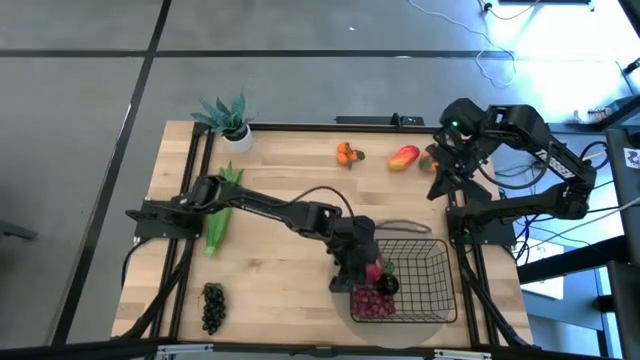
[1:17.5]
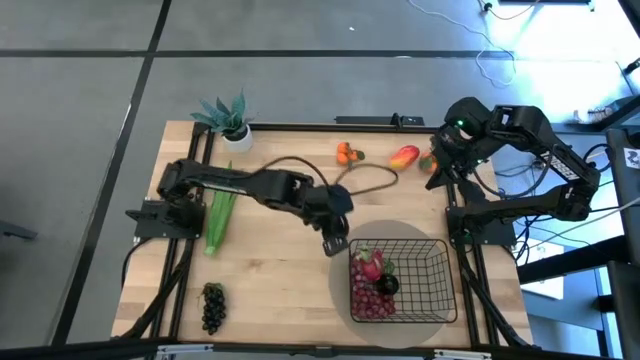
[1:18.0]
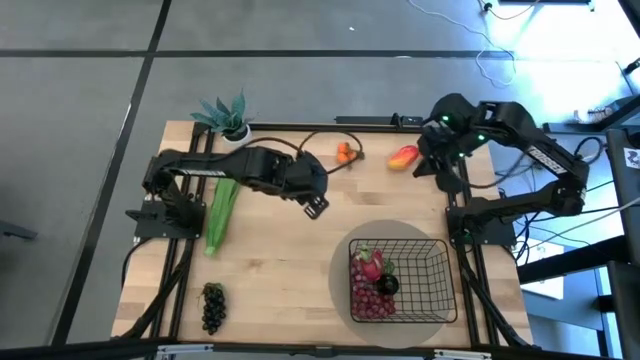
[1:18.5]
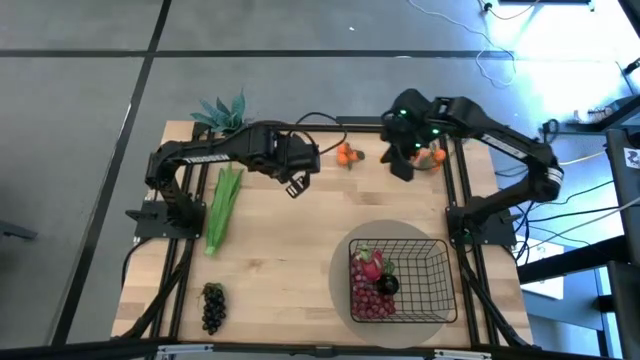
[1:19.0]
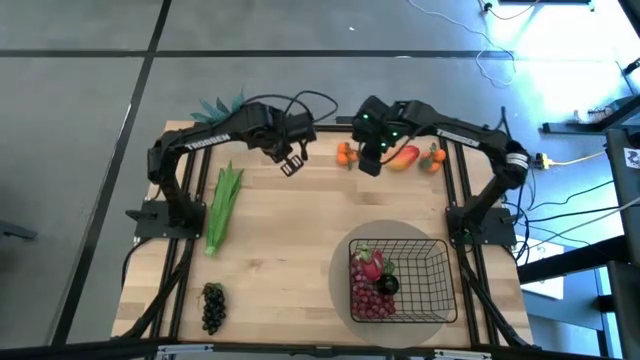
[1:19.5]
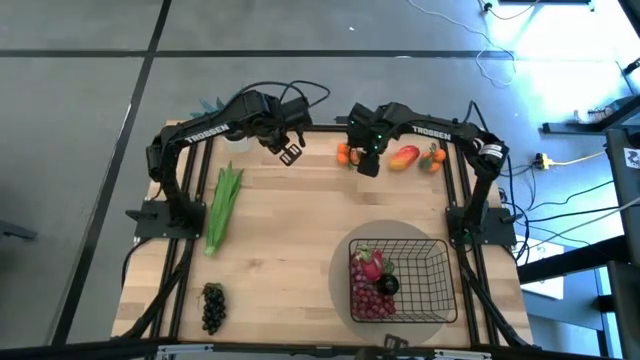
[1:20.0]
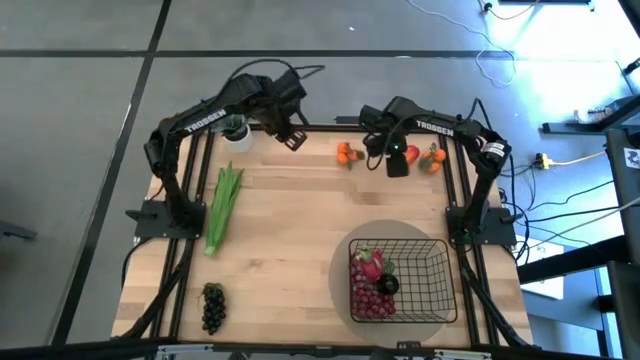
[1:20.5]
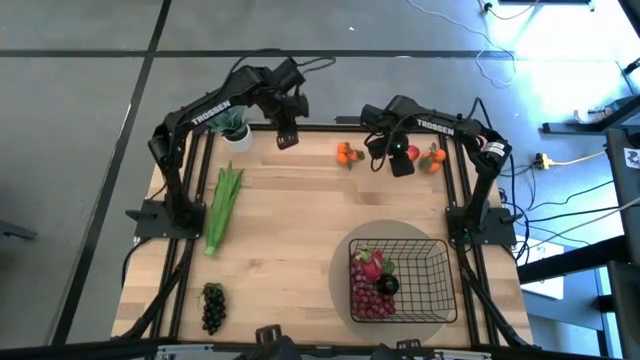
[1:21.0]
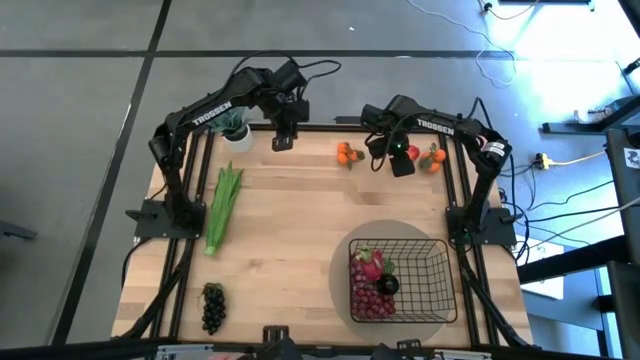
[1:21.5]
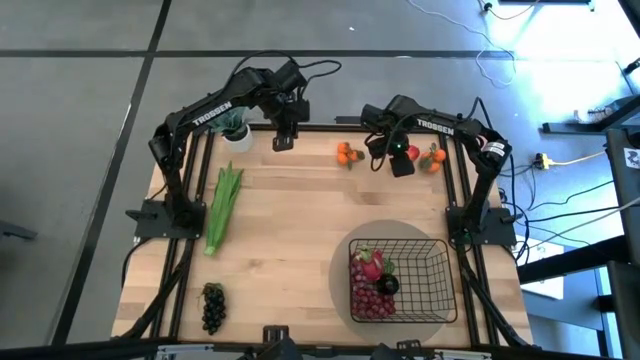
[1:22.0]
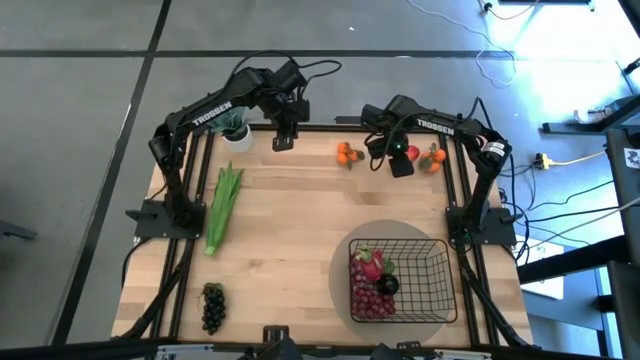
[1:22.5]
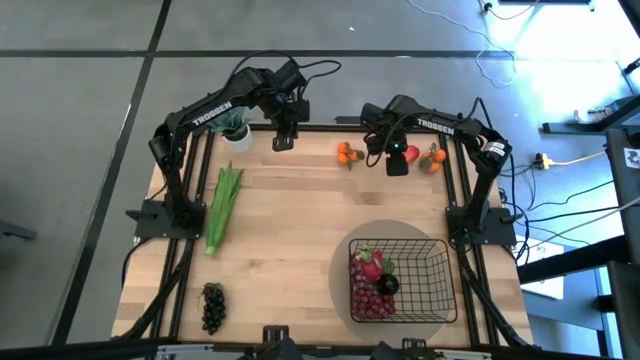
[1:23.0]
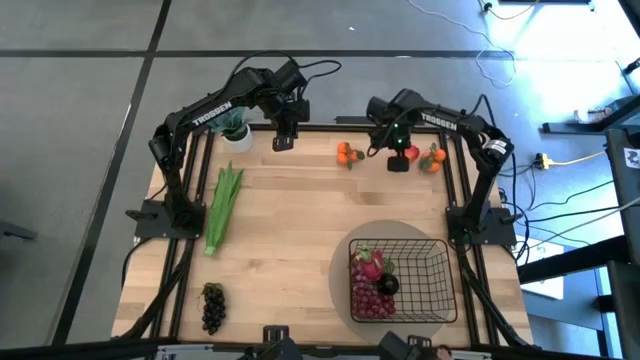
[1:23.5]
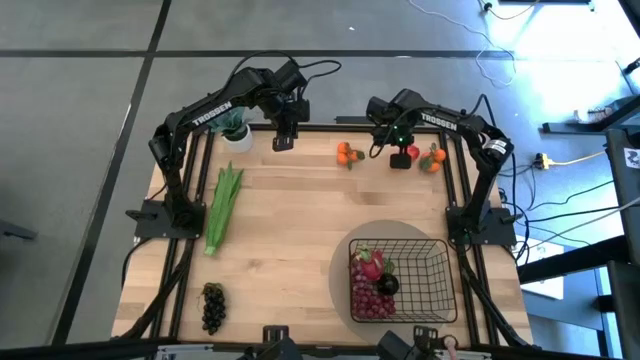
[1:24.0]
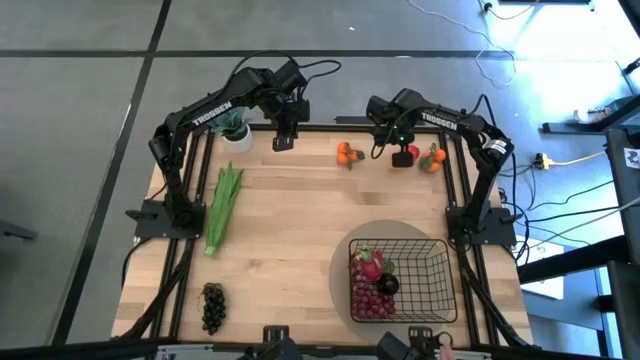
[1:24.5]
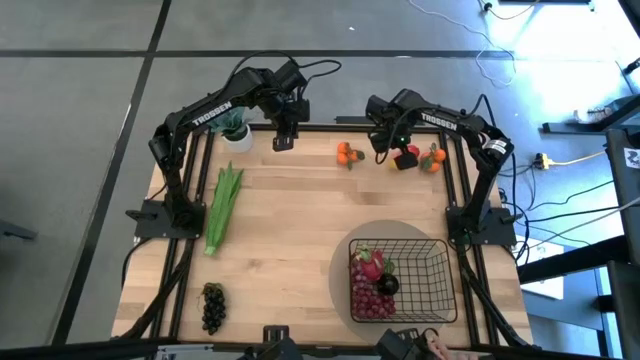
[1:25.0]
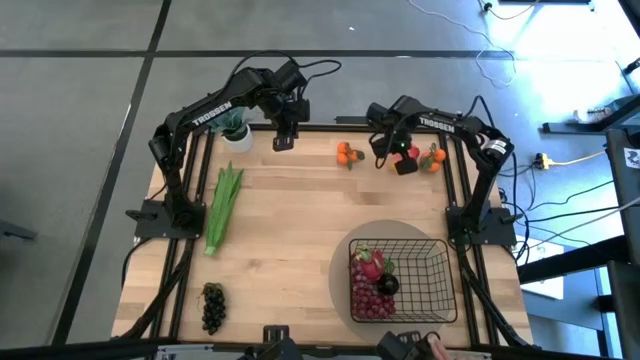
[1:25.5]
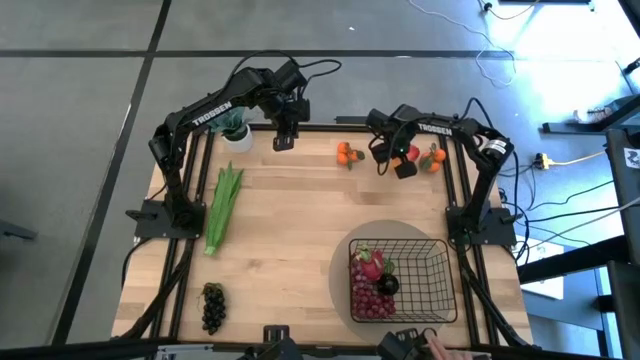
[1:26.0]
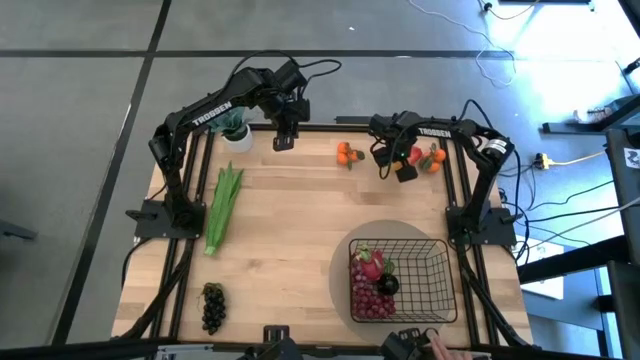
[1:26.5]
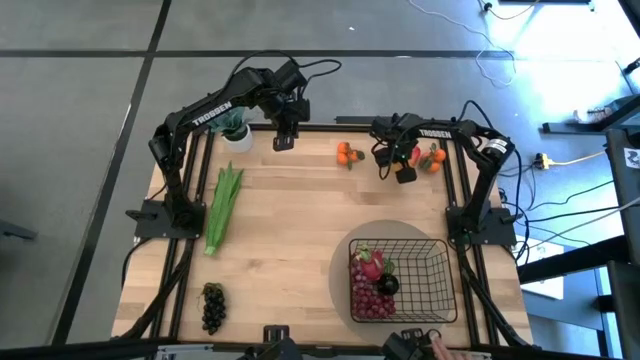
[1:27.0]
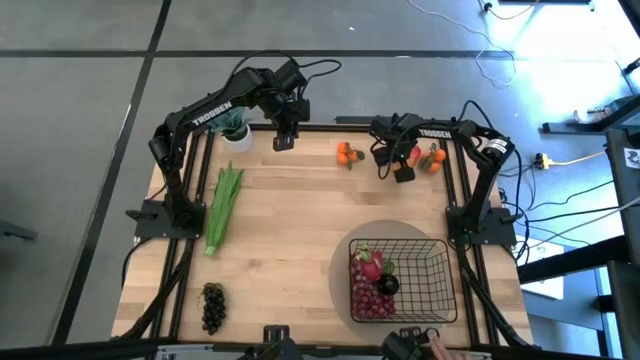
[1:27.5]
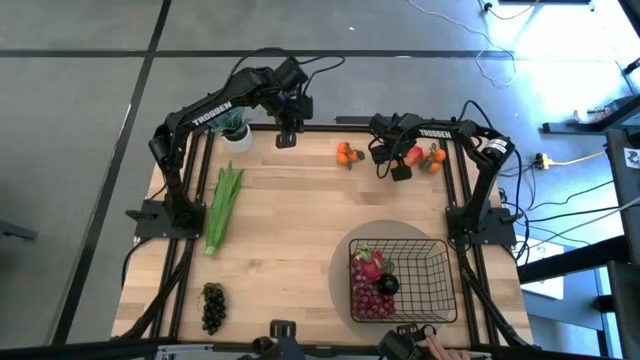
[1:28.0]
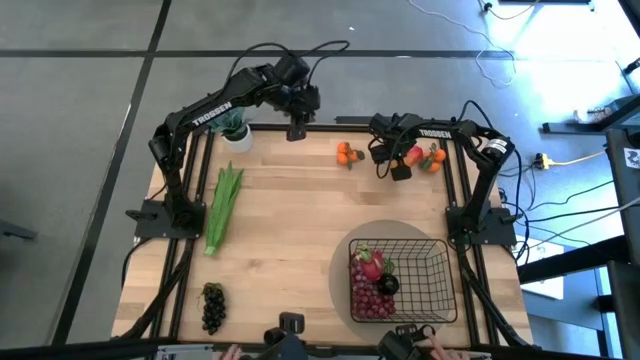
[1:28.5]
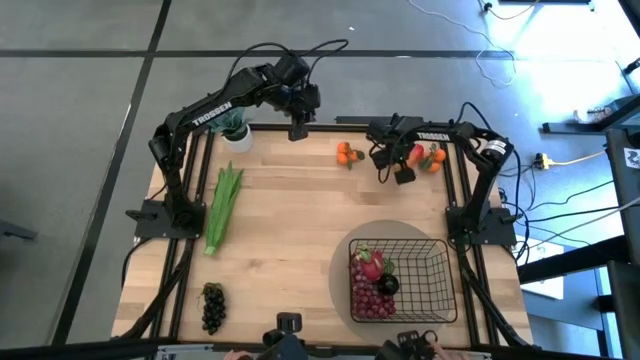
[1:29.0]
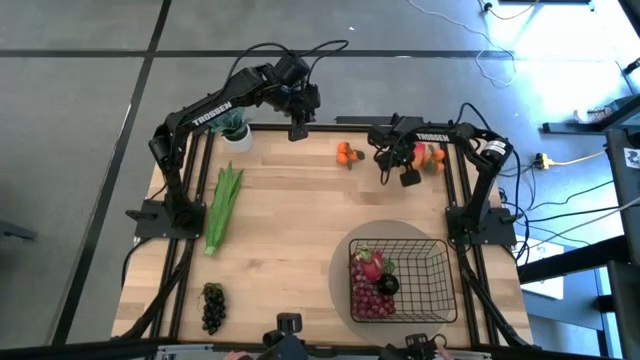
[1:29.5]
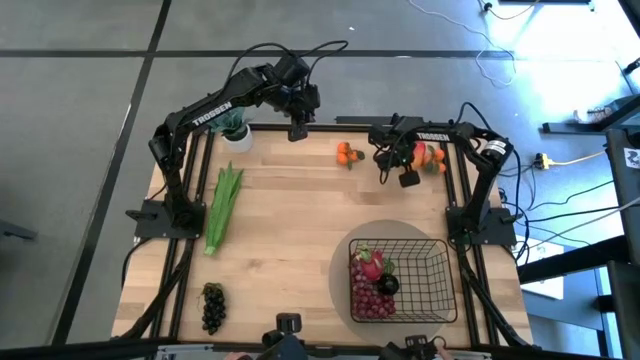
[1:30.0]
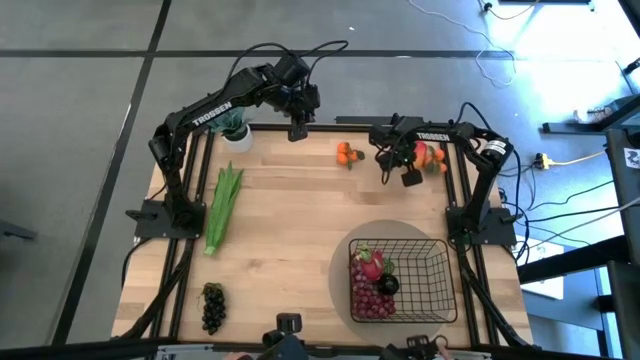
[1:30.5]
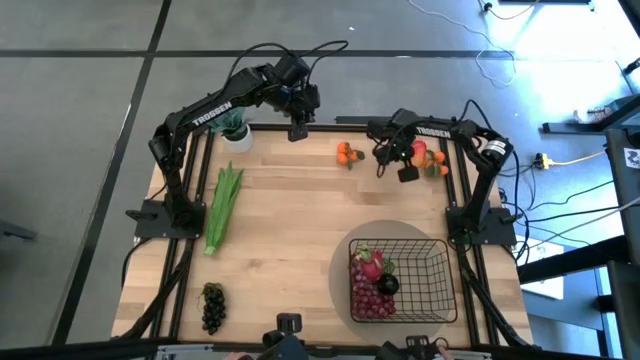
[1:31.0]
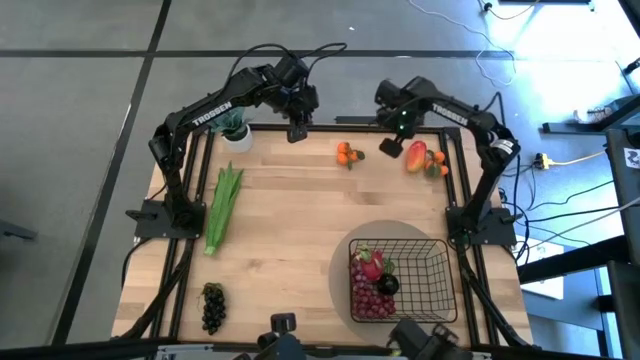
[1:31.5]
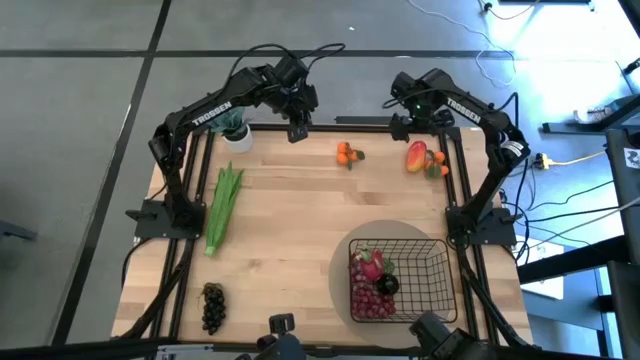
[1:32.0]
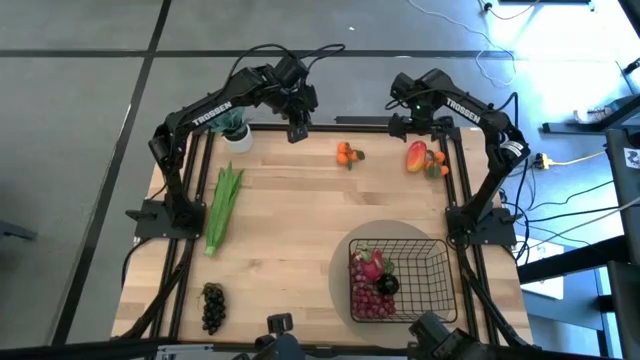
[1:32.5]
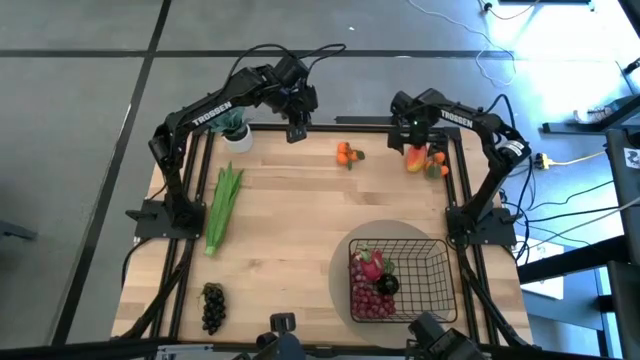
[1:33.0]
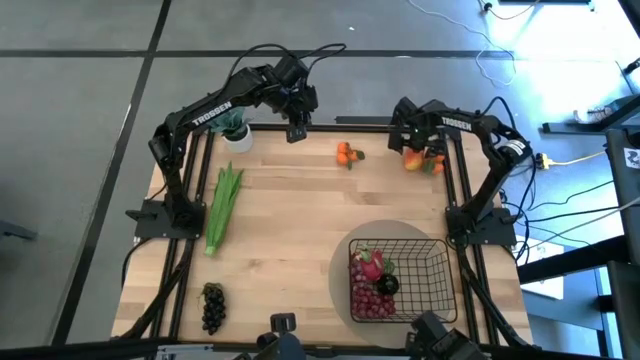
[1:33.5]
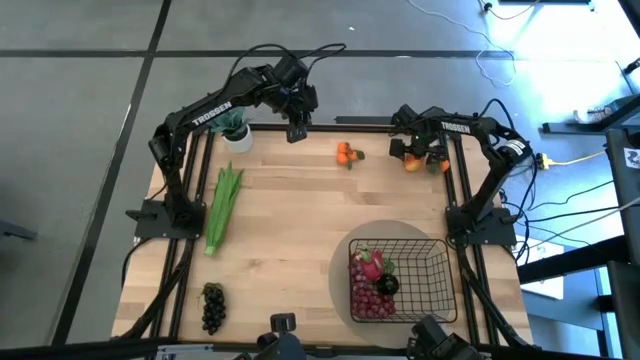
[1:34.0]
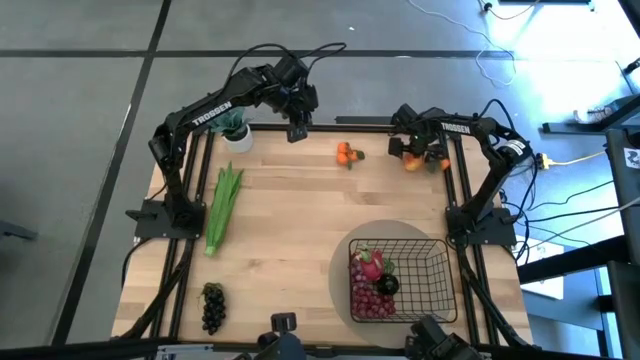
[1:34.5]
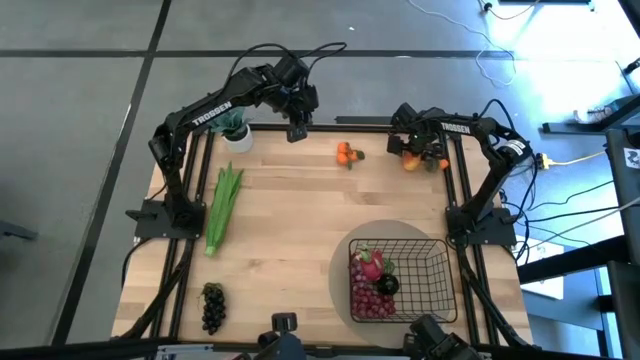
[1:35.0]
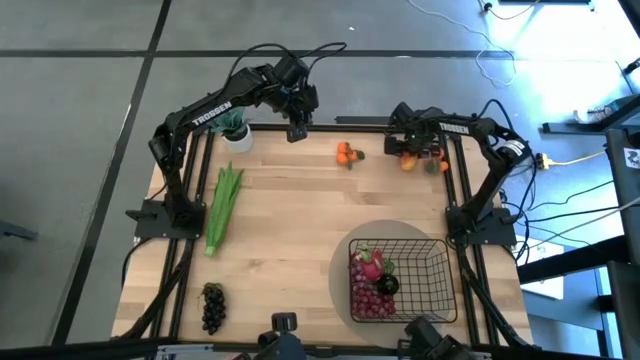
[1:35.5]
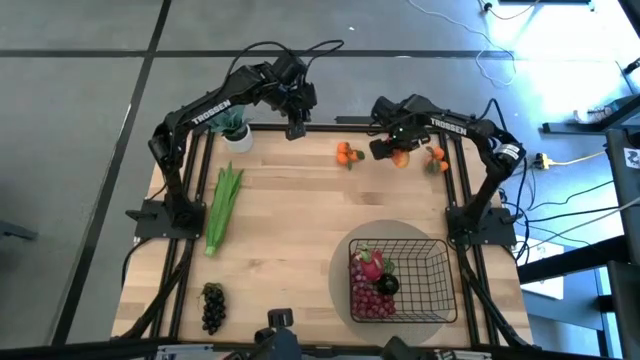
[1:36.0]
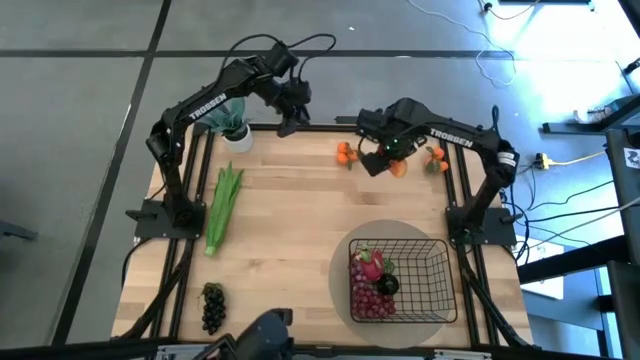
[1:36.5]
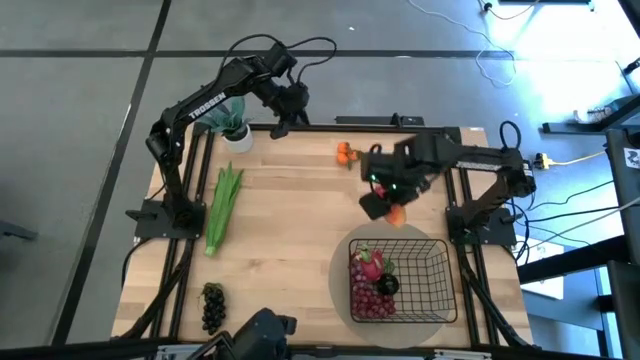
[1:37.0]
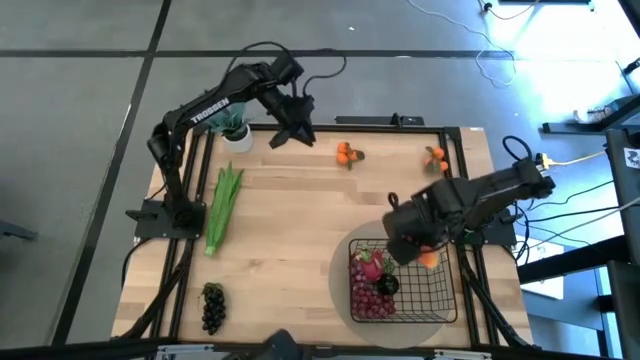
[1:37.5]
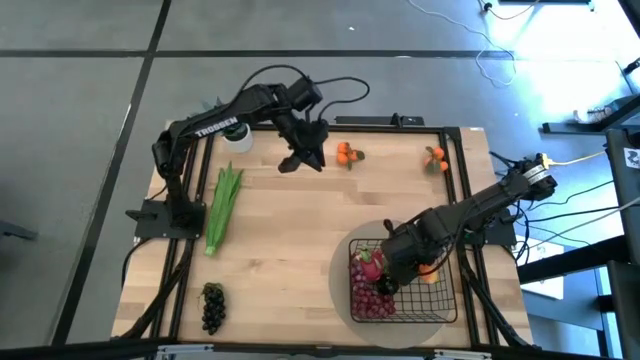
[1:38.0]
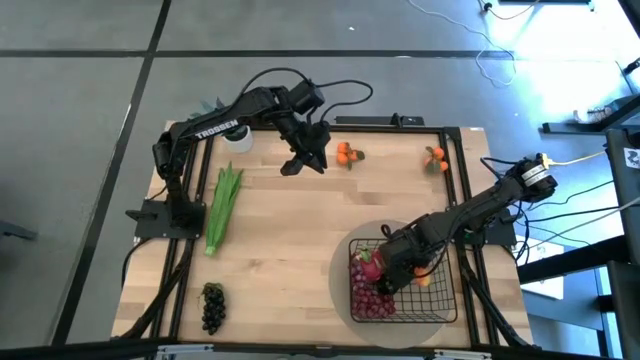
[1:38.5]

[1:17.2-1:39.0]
Task: Build produce basket
Put the red mango into the black wire basket
